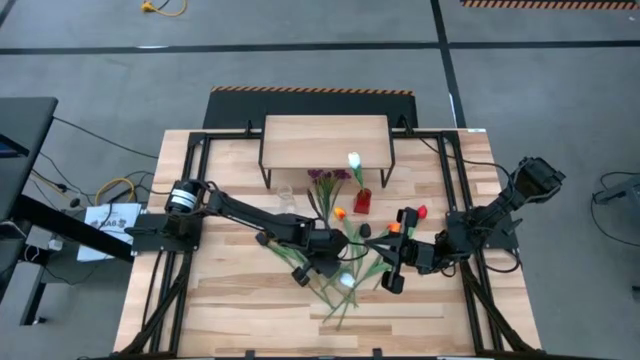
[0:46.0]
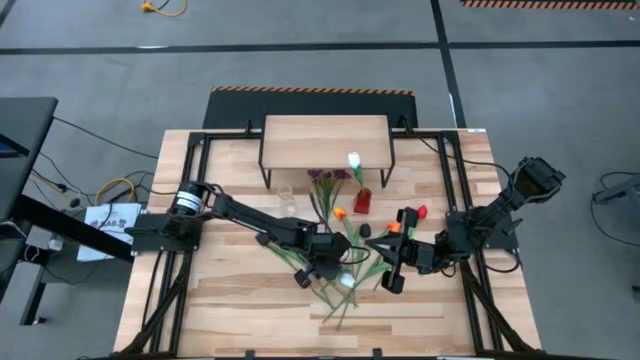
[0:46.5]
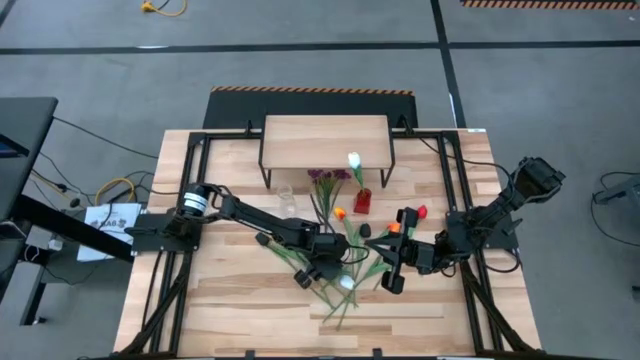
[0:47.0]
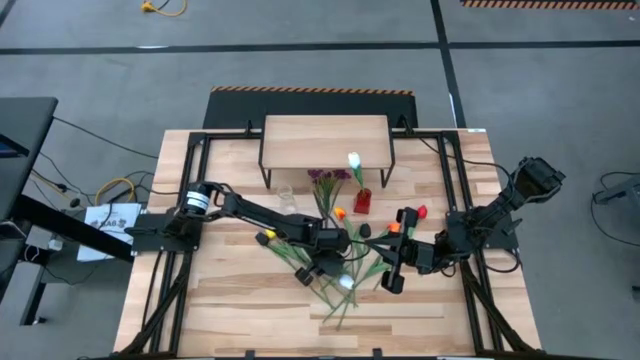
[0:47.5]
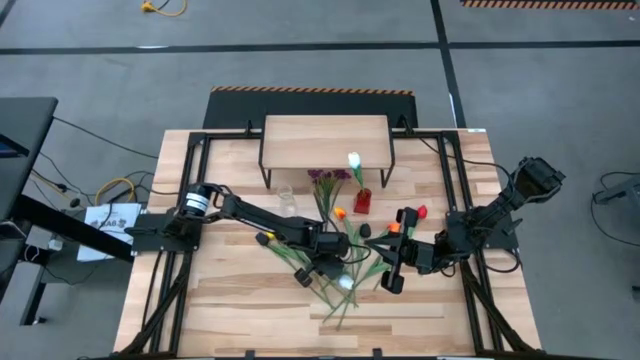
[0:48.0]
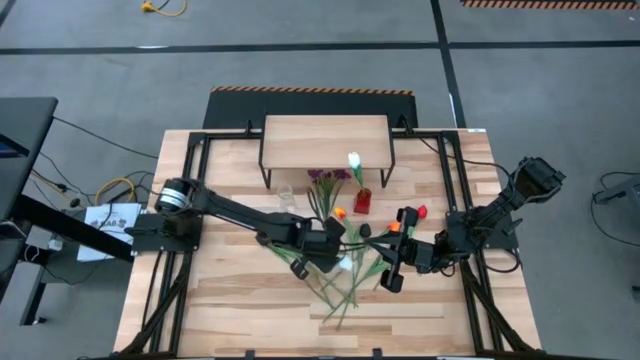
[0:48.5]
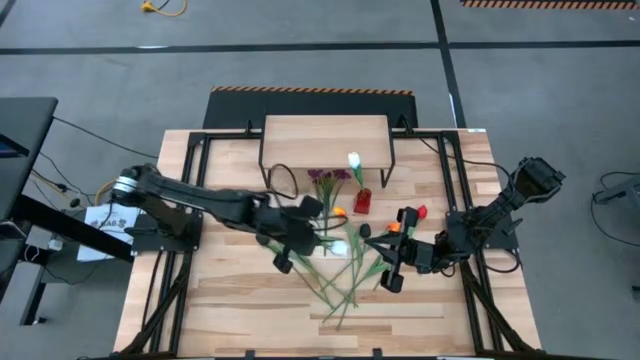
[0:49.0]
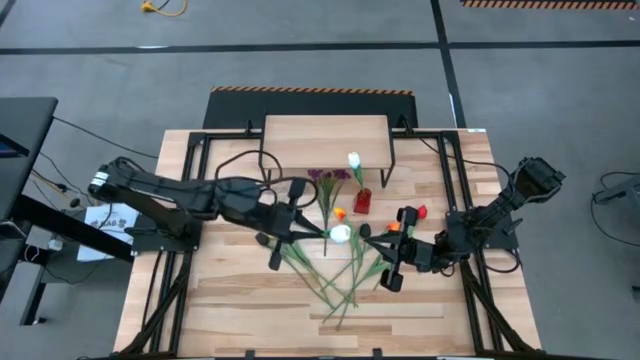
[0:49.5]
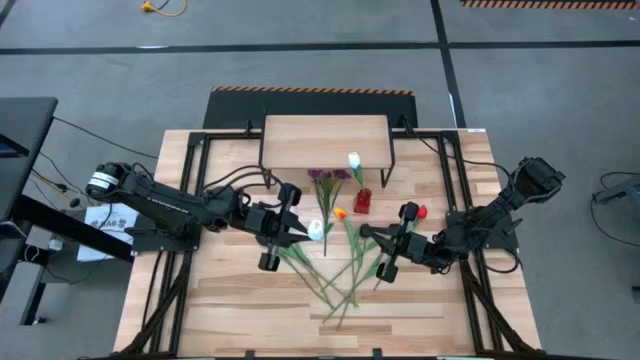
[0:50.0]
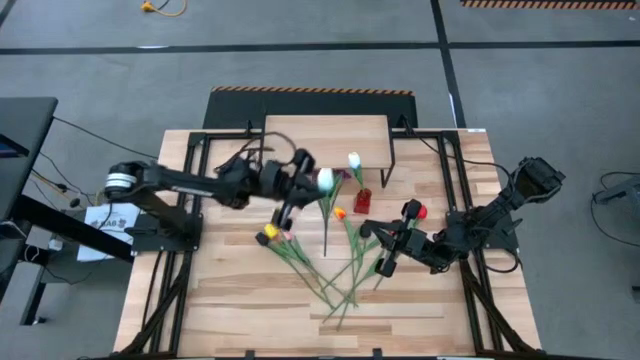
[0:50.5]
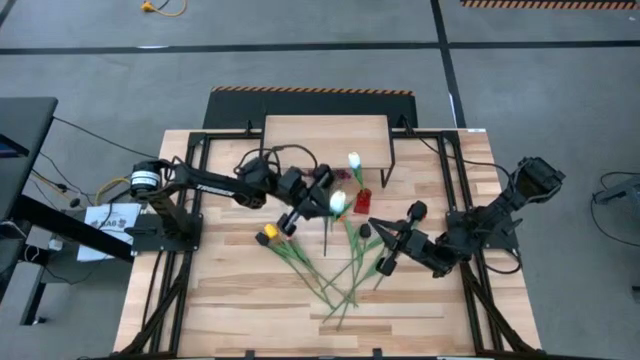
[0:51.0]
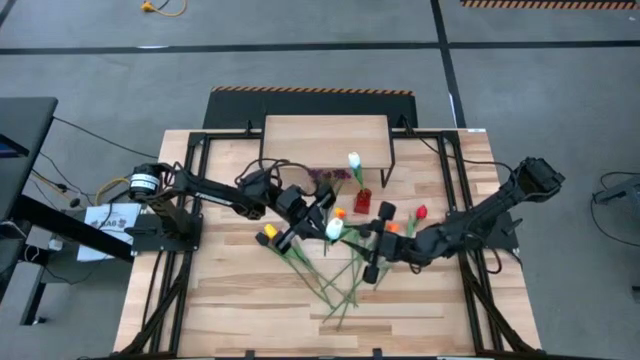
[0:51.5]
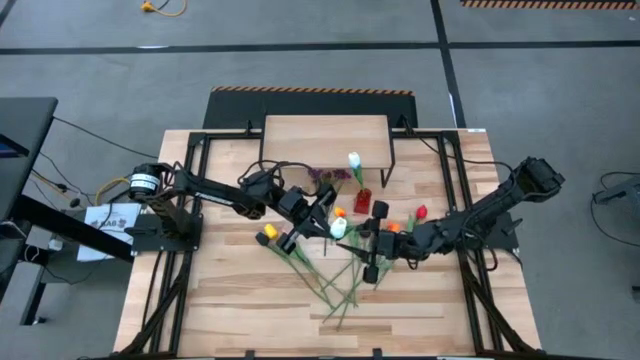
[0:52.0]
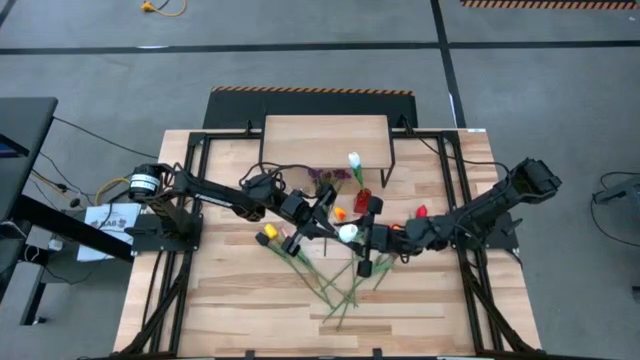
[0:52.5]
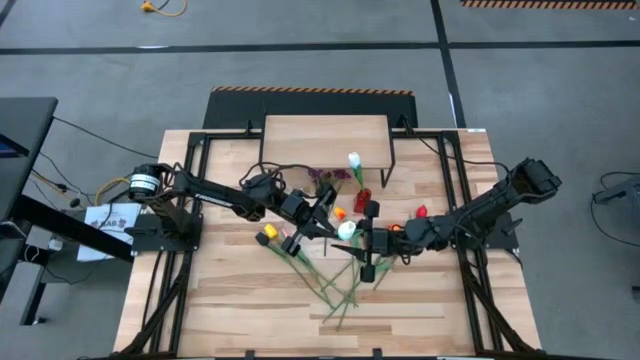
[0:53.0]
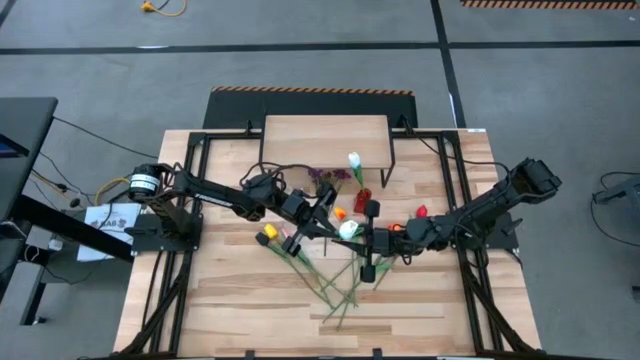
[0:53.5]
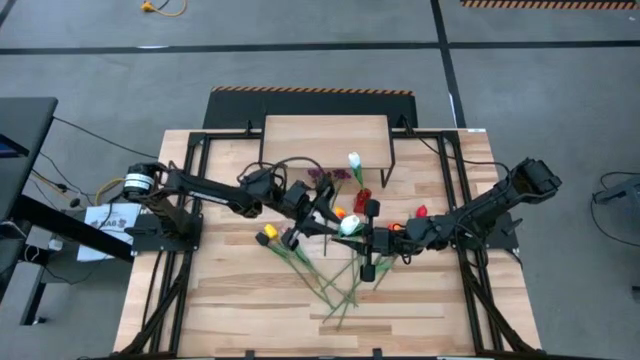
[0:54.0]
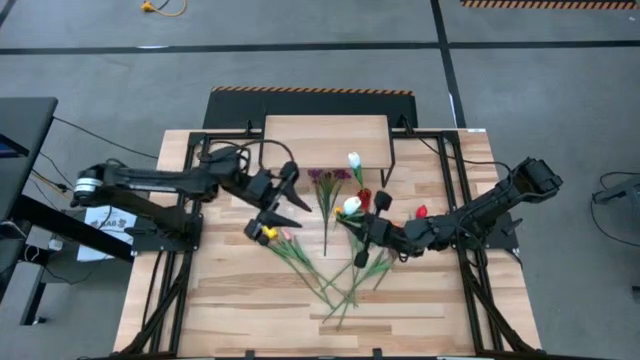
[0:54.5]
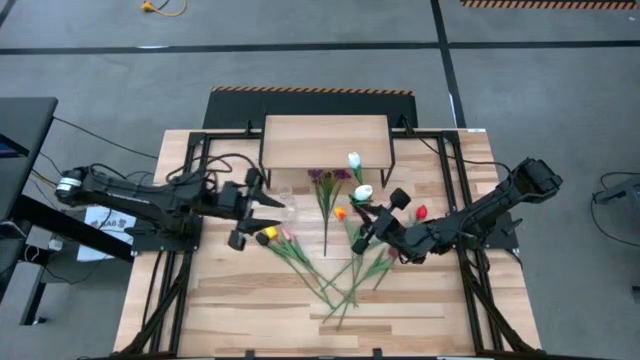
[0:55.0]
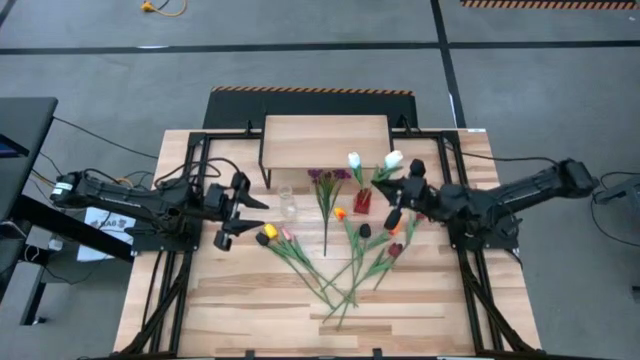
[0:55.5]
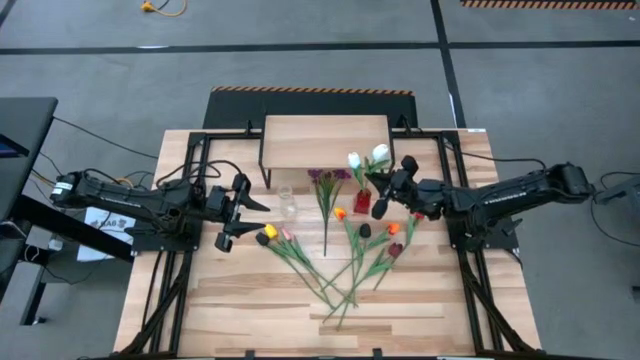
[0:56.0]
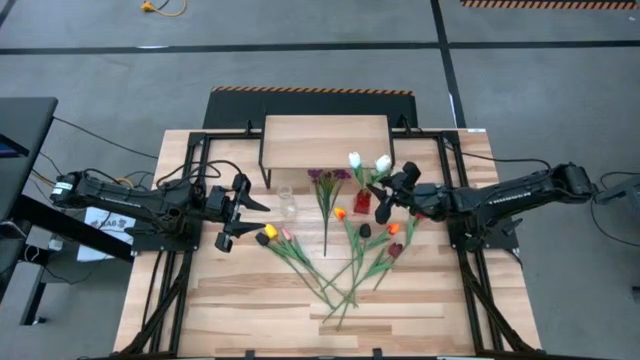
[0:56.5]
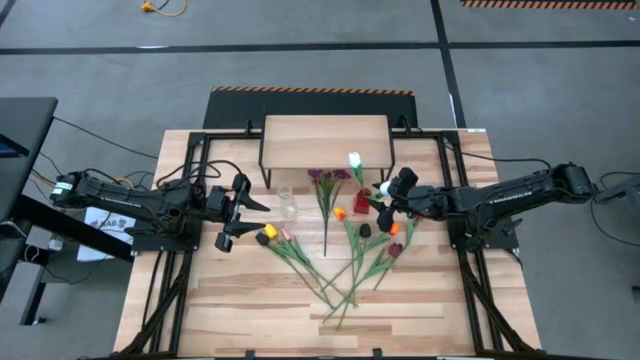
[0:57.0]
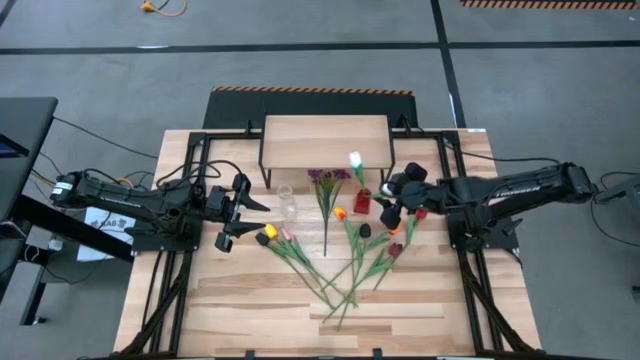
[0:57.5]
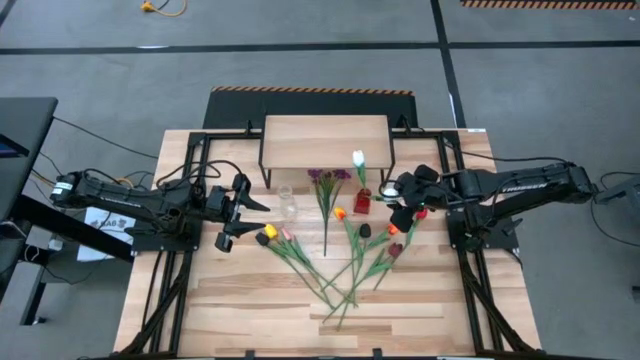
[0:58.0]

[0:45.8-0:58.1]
Task: Pick and place flowers into a vace then onto a shelf
Put the white blue flower into the red flower vase

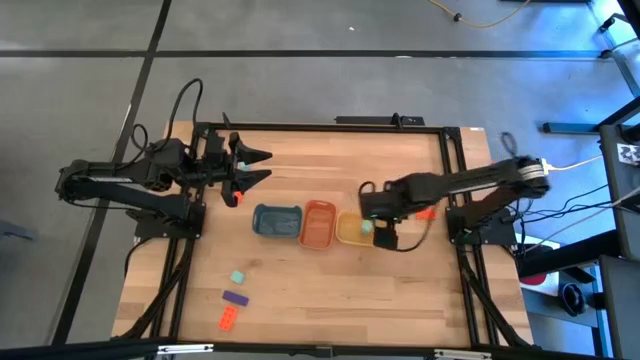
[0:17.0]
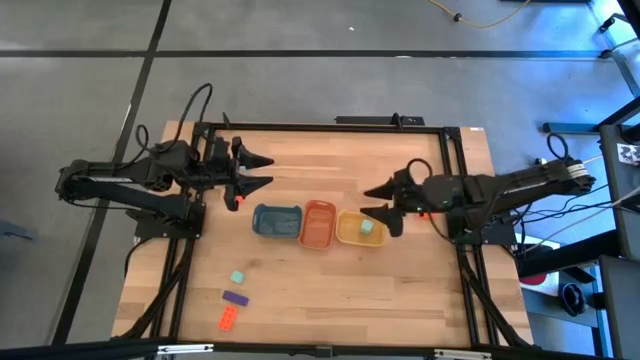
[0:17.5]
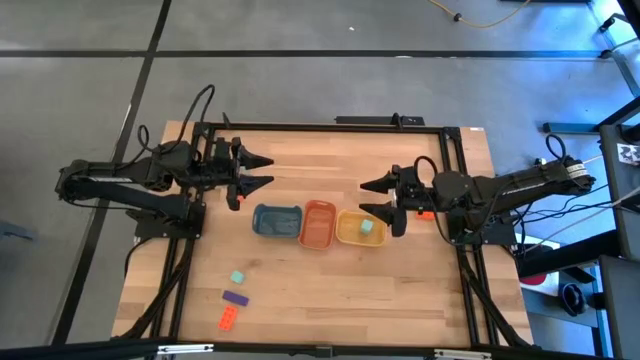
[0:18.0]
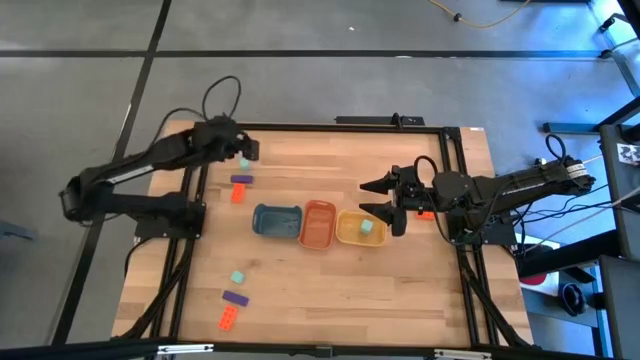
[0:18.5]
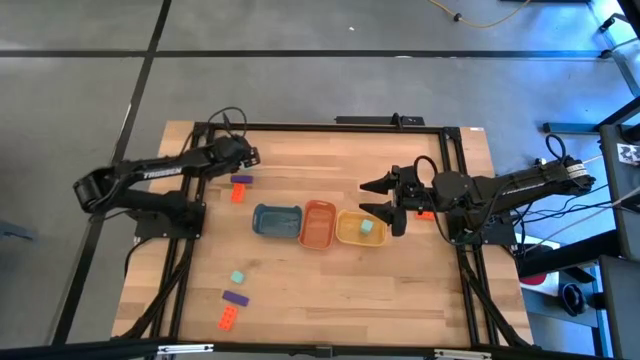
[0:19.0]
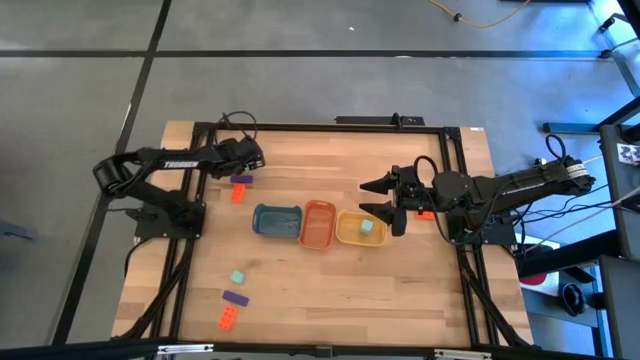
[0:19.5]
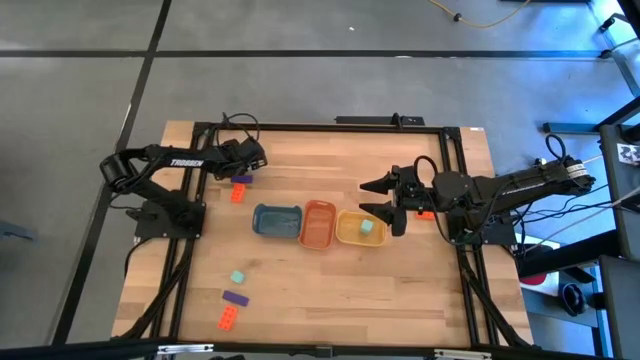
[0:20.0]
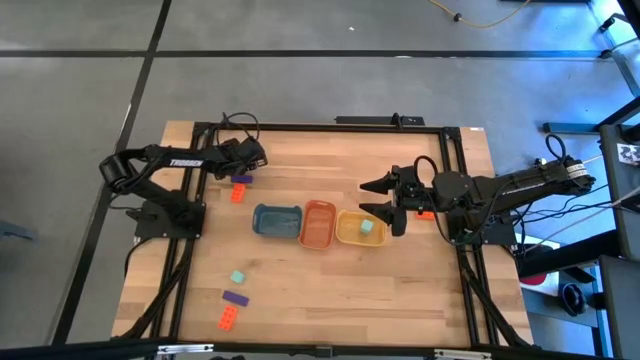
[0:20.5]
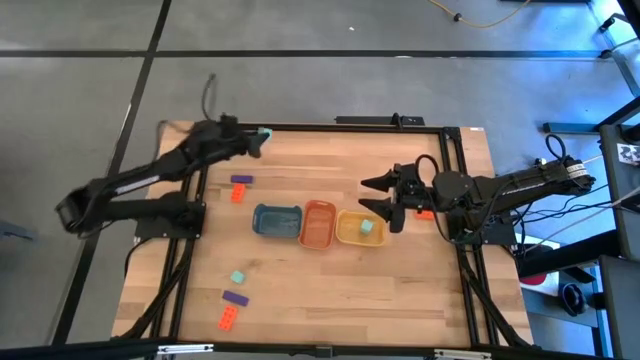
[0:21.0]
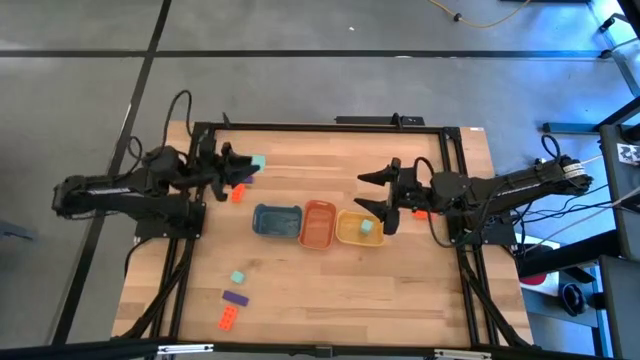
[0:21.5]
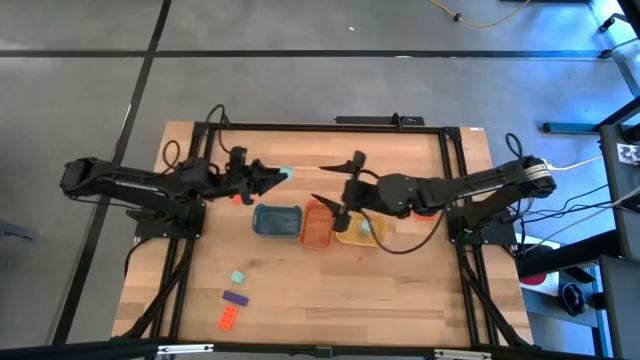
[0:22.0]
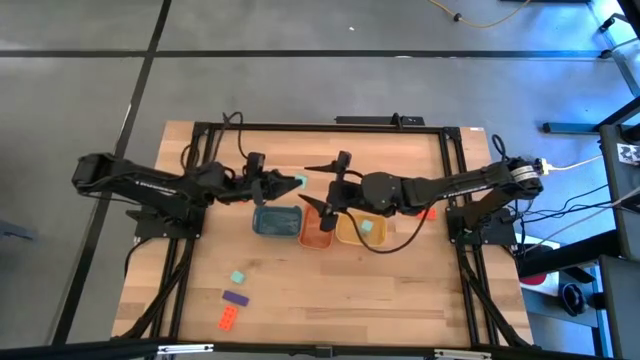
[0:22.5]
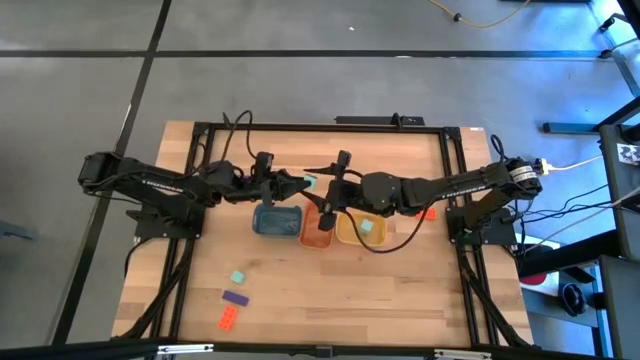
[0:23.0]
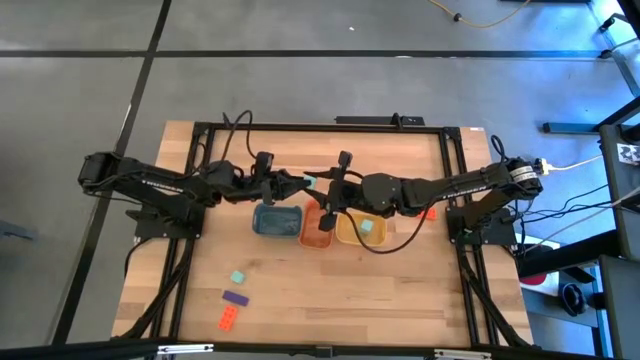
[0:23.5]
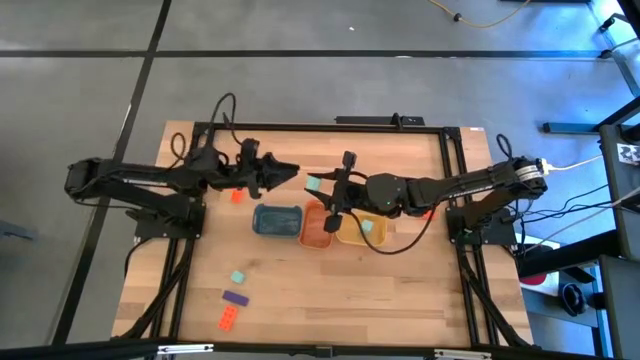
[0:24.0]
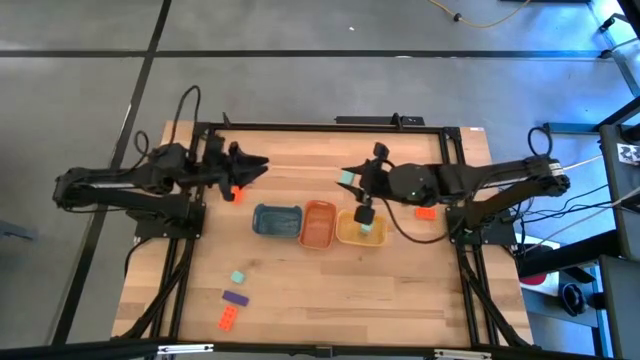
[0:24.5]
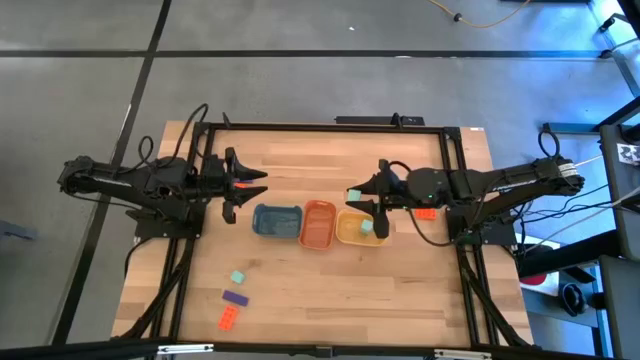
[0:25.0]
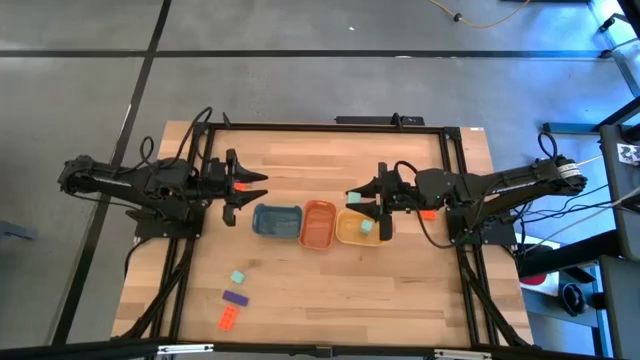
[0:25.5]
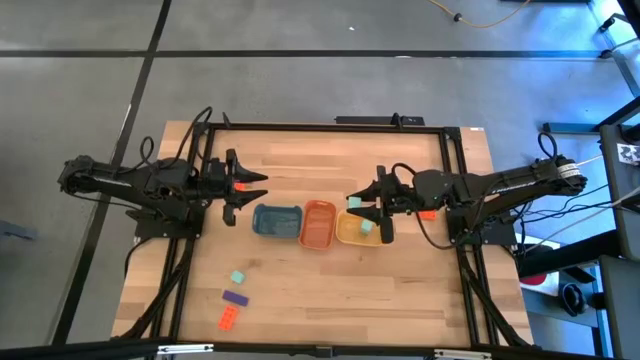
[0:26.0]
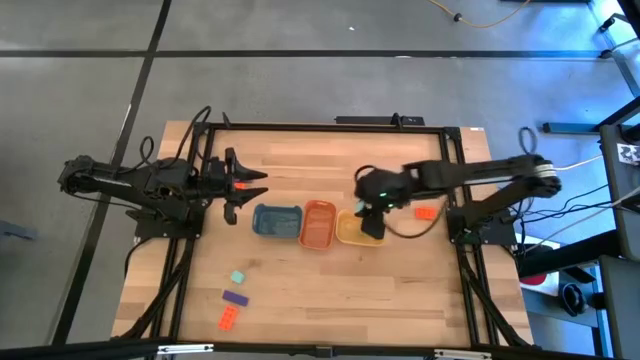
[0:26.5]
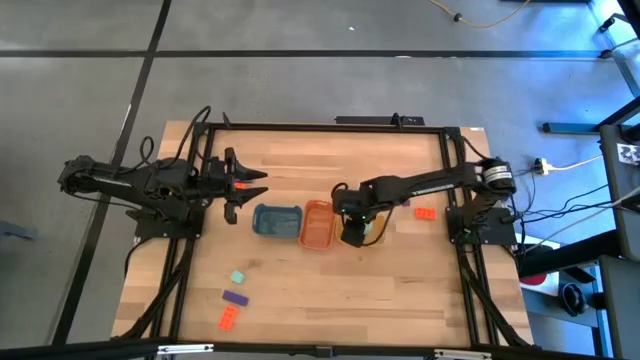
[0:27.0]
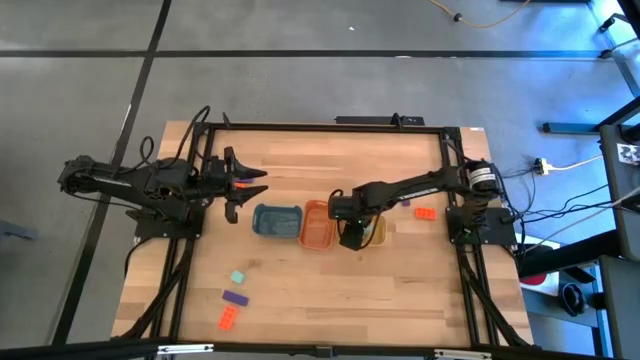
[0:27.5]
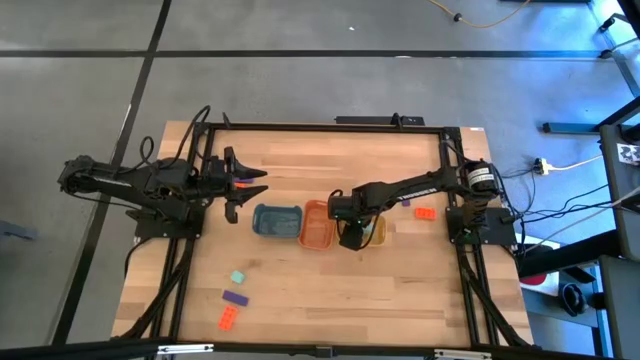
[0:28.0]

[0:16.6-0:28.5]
Task: Sort & place blocks by color
Put the top light blue square block into the yellow bin
